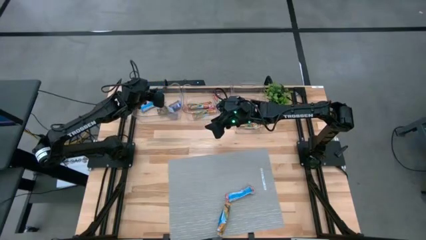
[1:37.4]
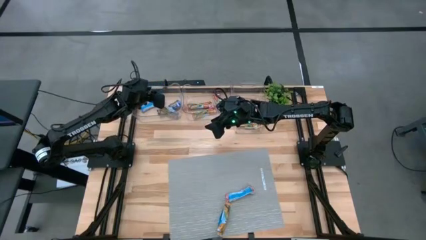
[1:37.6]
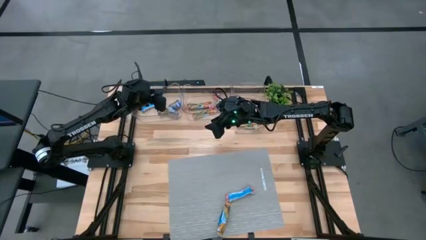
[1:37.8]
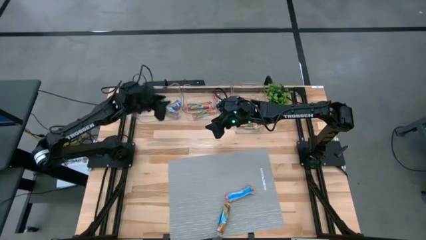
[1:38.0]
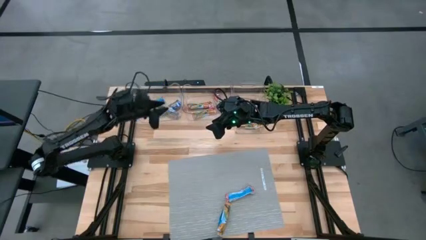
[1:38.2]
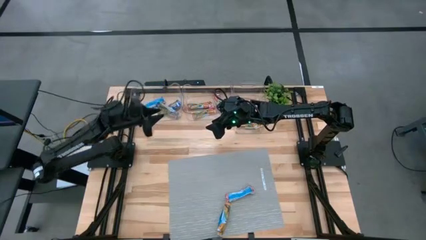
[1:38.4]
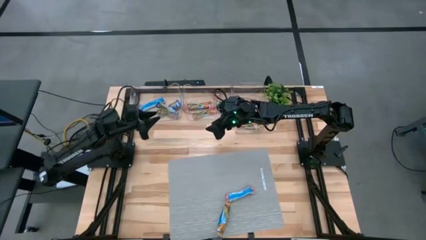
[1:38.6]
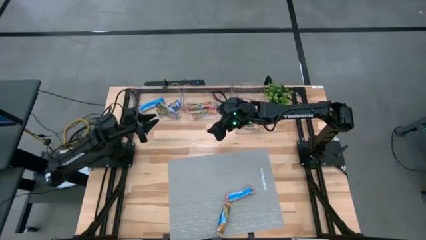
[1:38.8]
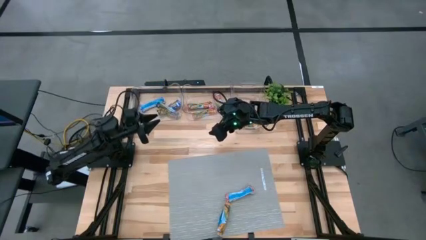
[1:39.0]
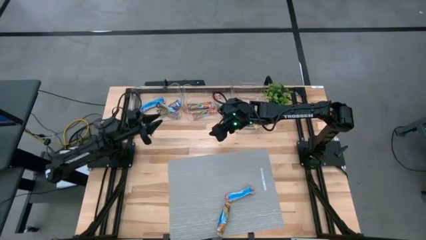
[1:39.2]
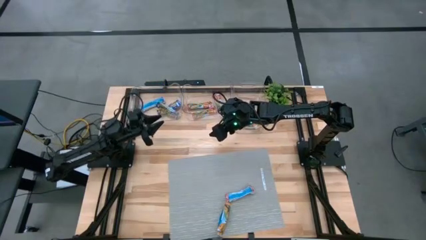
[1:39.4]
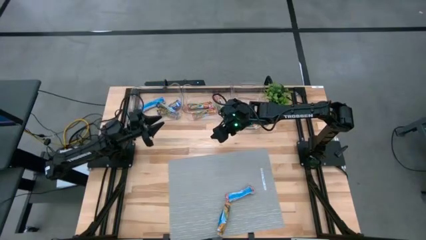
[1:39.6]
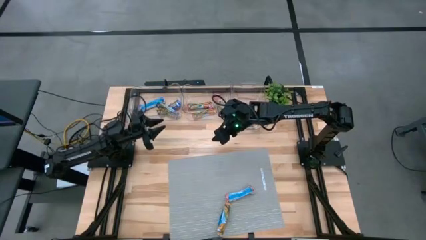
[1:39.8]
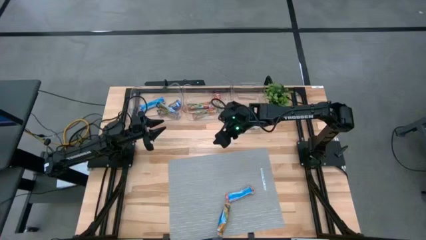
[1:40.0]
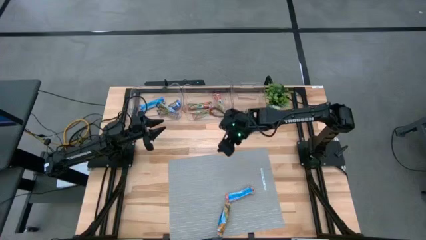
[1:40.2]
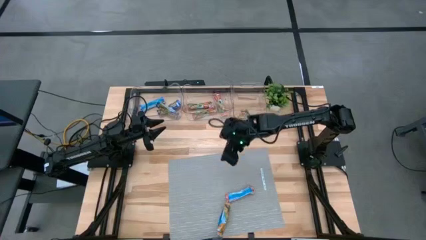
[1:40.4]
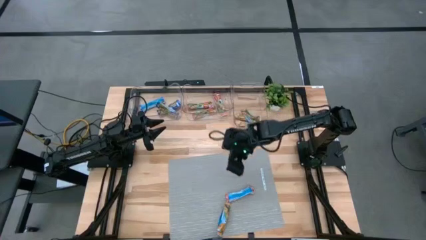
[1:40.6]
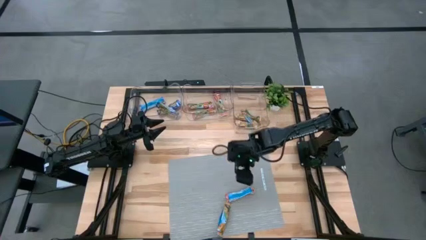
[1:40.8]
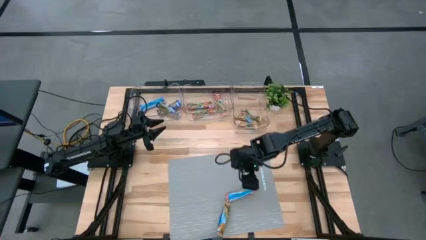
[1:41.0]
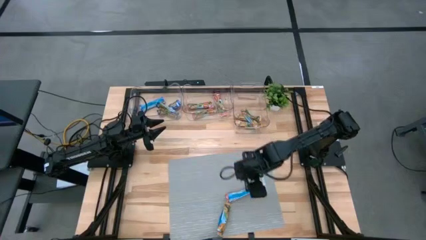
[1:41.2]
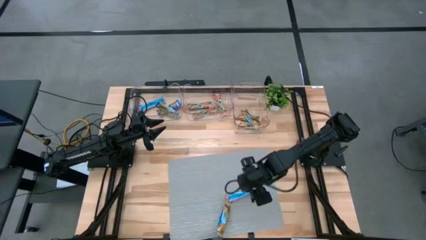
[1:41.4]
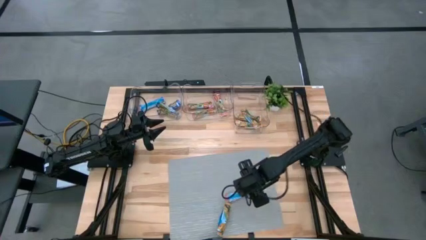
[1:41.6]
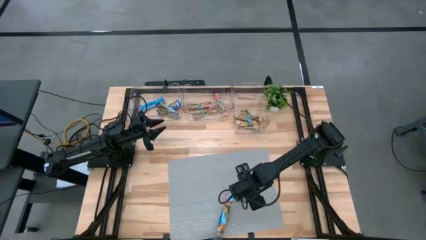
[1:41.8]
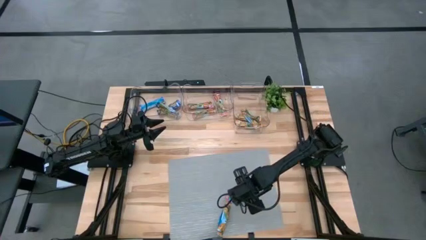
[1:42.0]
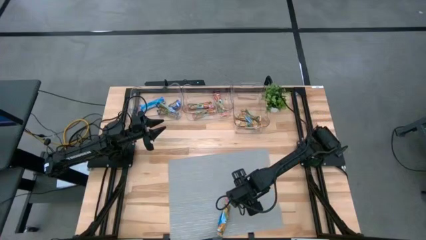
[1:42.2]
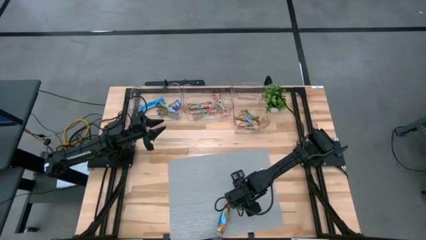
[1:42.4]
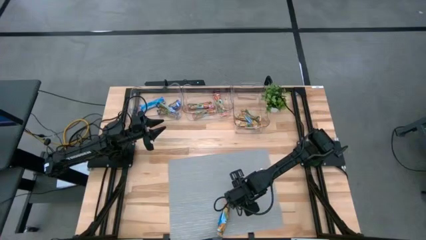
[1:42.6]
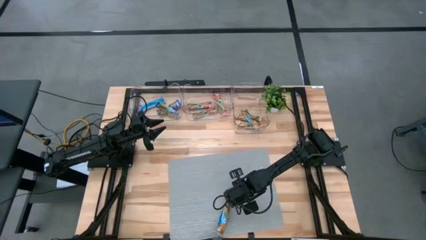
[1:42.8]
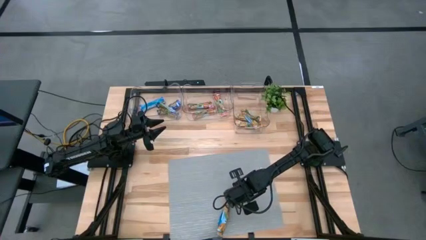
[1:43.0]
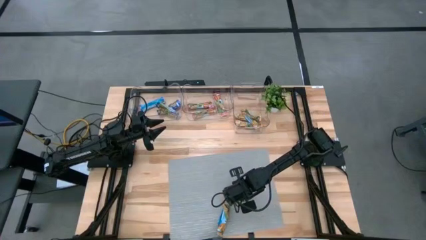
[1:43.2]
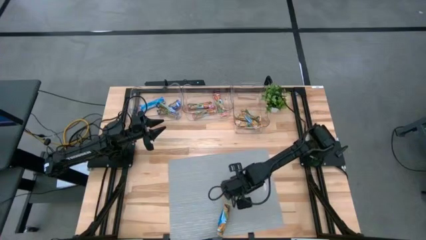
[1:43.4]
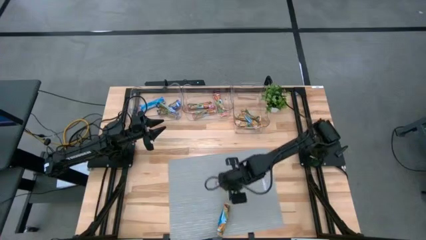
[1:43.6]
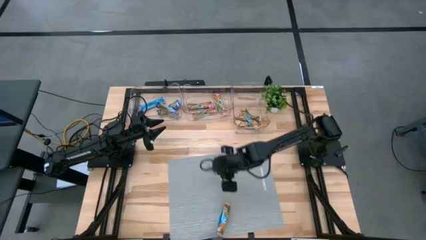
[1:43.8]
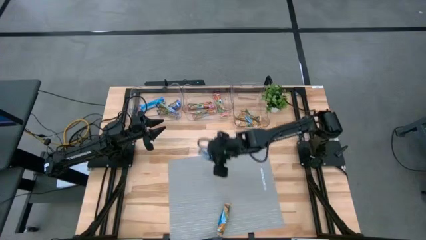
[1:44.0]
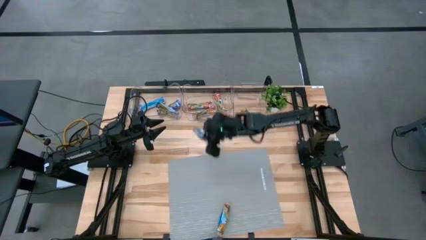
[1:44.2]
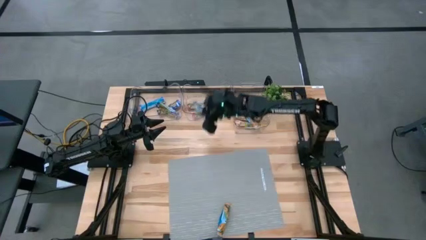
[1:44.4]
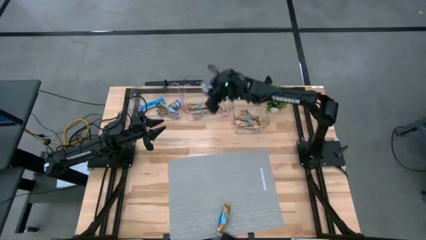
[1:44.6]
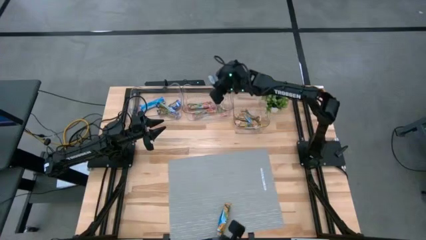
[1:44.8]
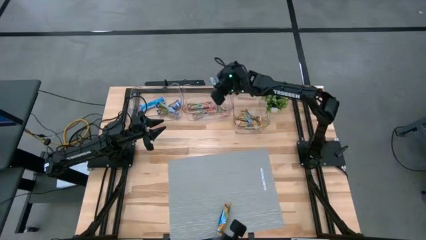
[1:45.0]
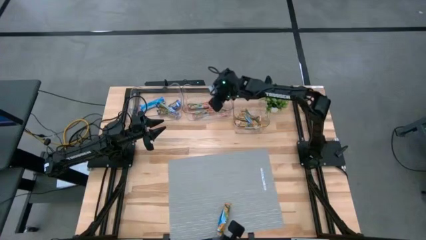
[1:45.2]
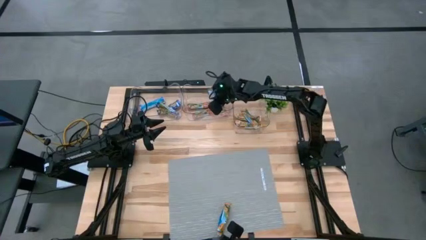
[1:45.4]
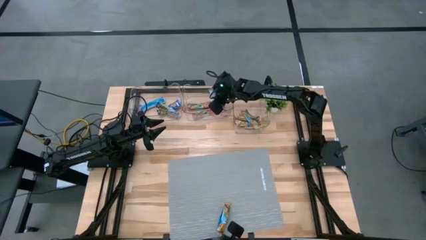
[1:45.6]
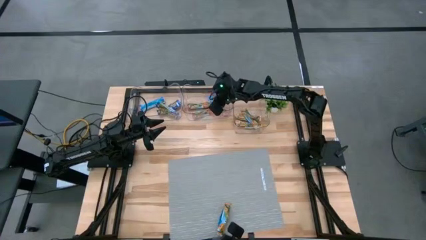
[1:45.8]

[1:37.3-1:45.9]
Task: Pick and place Granola Bars by type
Put the red oat granola into the middle transparent bin

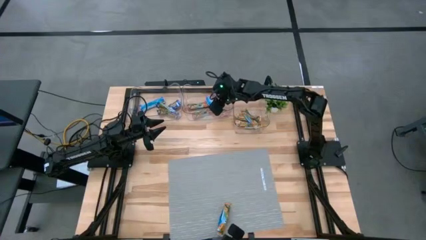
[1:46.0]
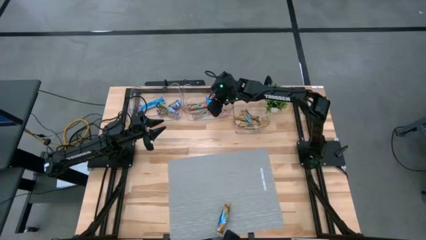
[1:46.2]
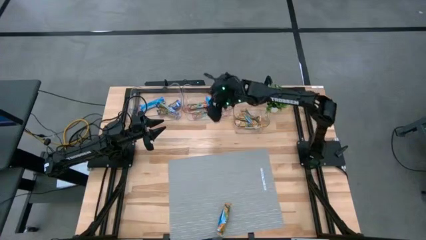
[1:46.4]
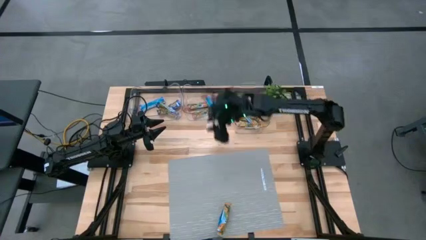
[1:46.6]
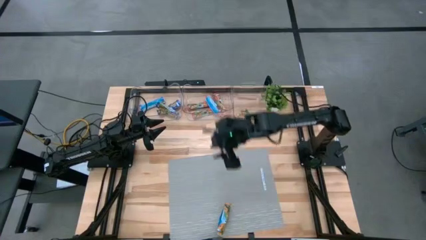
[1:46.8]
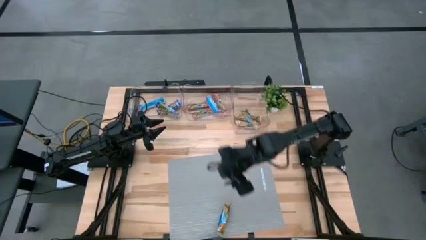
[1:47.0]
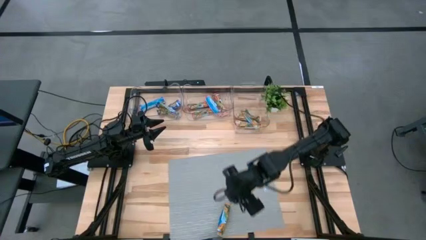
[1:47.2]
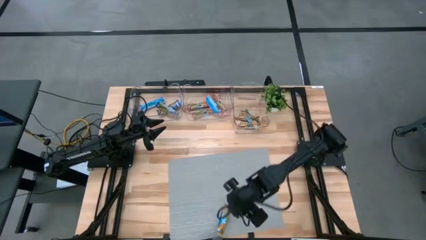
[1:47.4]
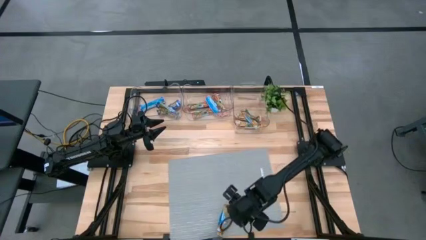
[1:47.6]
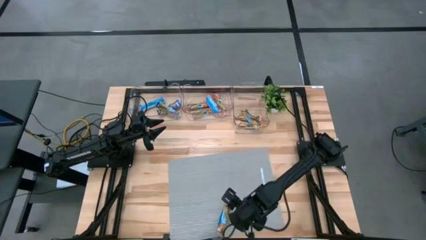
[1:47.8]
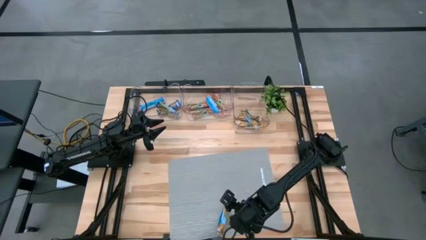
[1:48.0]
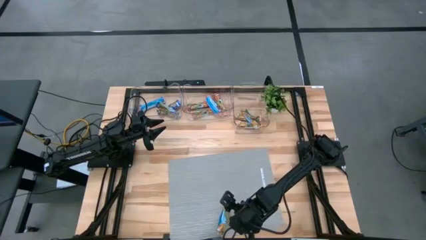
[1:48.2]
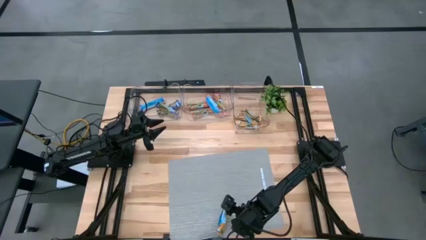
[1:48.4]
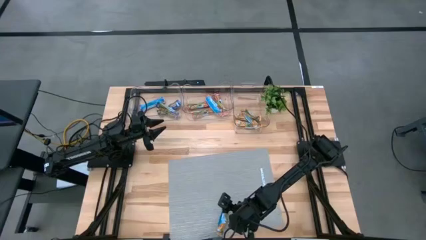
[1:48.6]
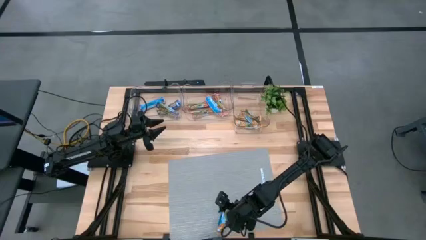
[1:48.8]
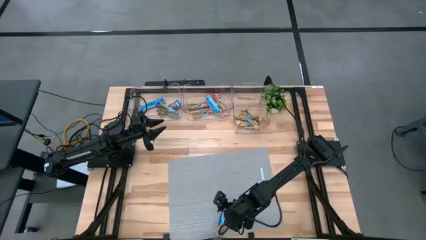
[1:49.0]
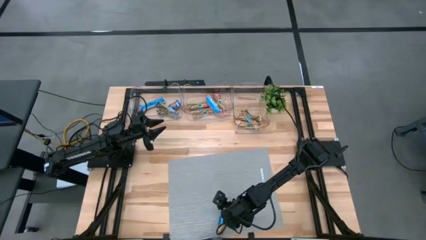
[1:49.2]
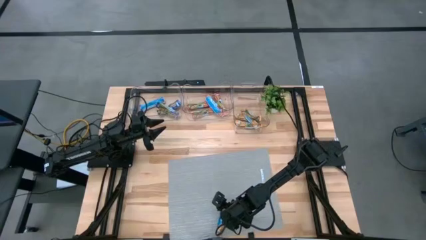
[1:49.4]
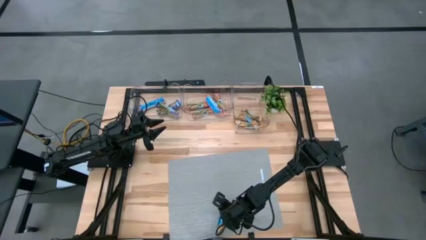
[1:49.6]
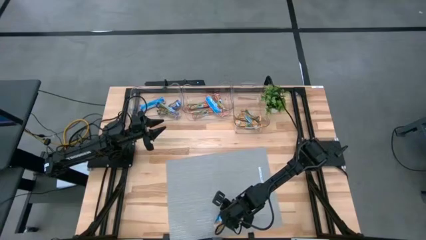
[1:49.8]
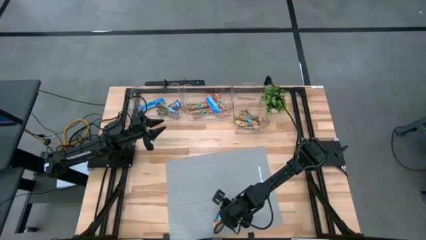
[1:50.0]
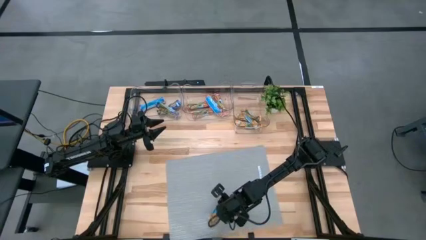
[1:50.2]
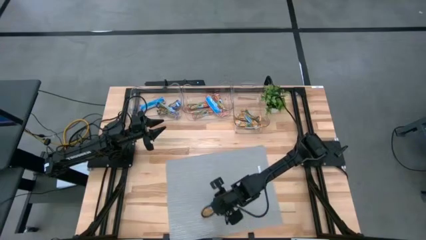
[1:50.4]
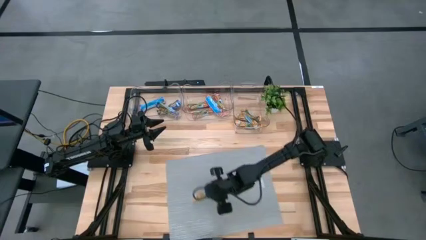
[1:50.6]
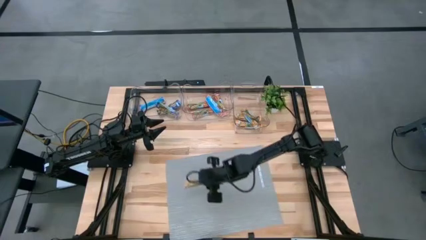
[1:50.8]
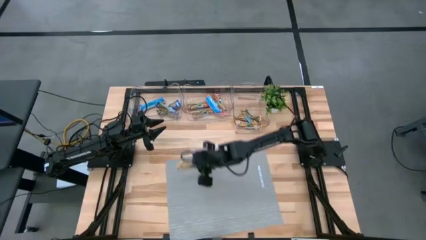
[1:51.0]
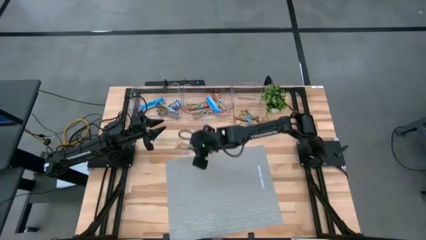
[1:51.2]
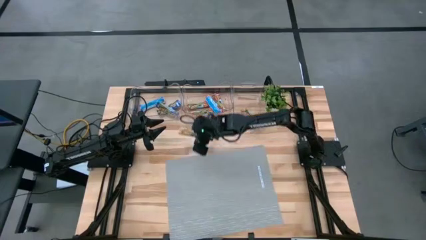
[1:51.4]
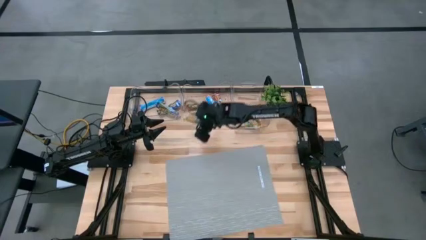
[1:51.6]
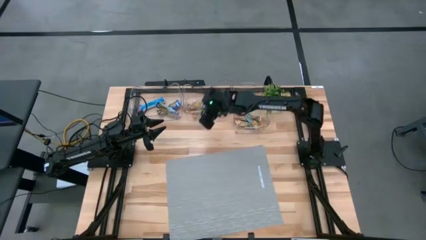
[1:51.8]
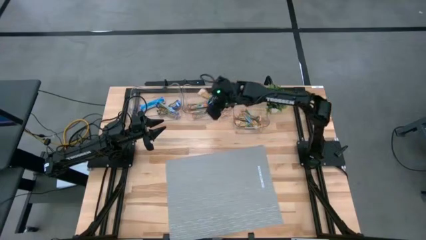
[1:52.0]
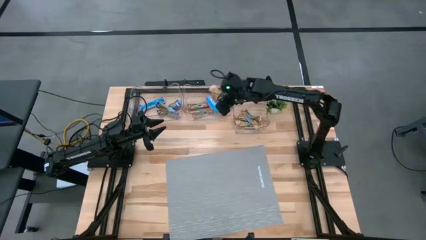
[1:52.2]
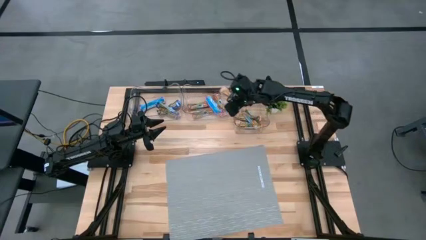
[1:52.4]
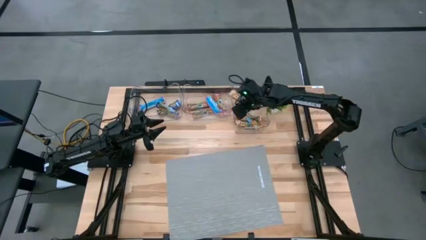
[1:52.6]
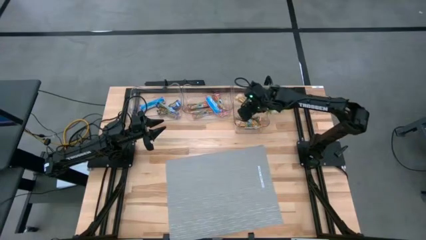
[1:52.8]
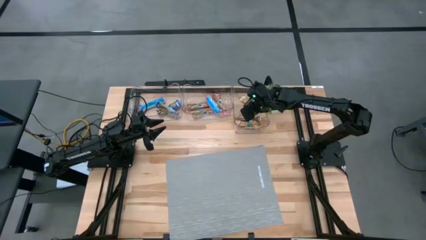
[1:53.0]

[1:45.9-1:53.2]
Put the yellow granola bar into the right transparent bin
